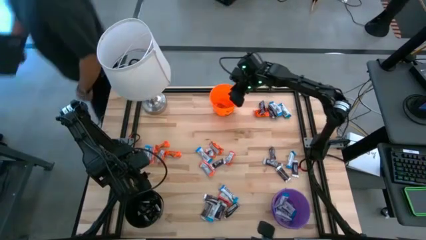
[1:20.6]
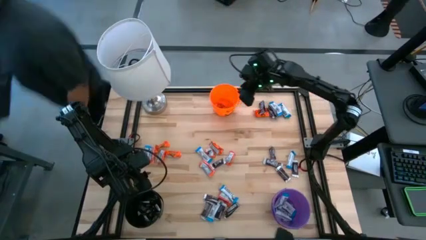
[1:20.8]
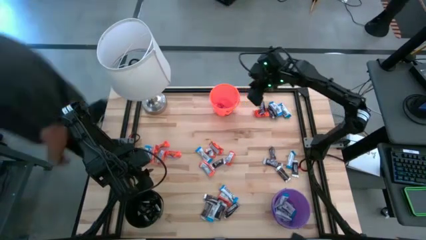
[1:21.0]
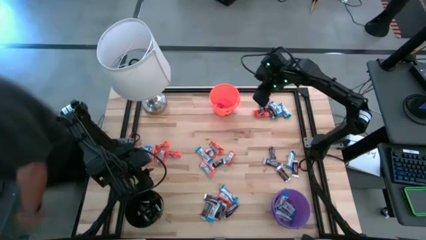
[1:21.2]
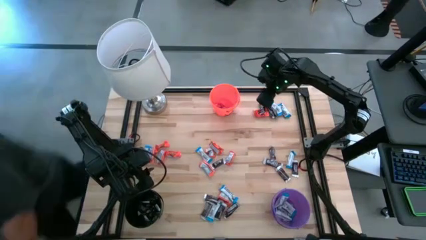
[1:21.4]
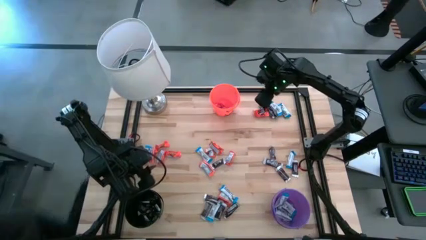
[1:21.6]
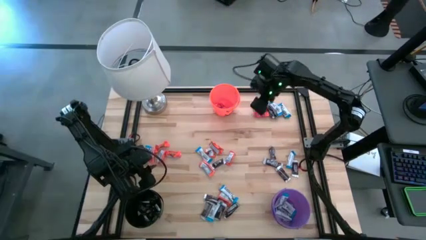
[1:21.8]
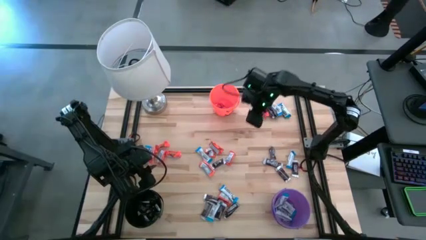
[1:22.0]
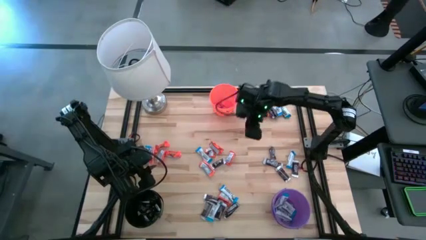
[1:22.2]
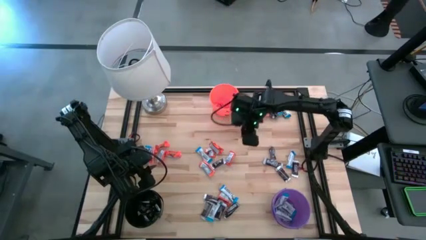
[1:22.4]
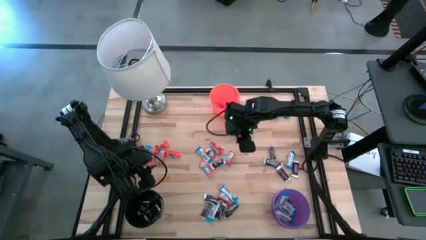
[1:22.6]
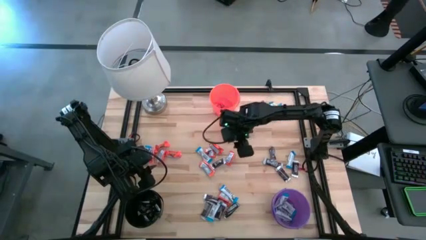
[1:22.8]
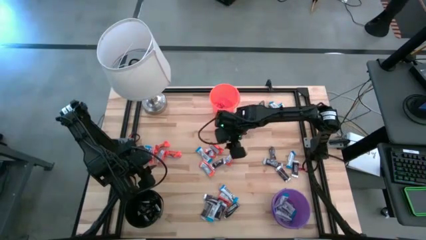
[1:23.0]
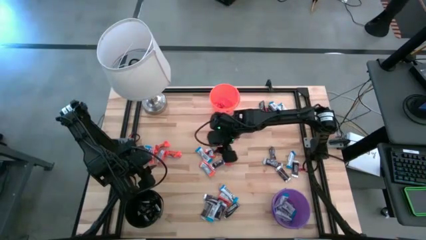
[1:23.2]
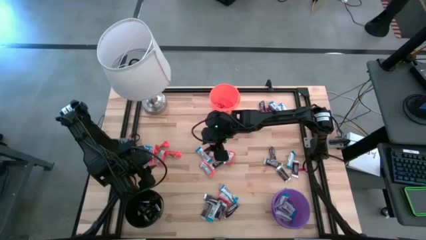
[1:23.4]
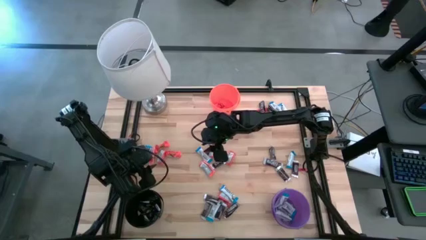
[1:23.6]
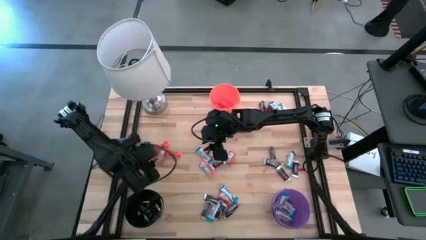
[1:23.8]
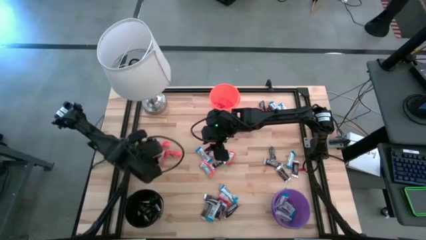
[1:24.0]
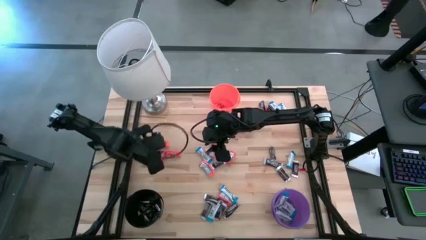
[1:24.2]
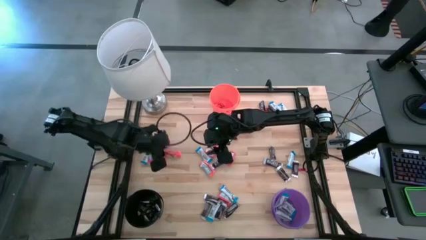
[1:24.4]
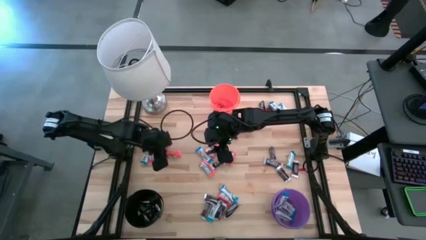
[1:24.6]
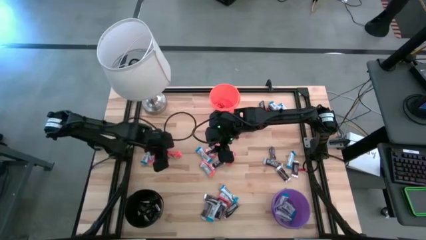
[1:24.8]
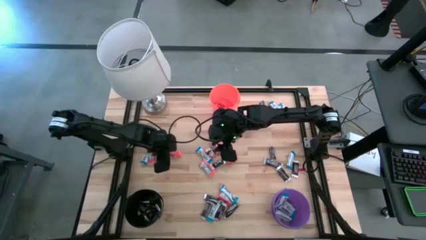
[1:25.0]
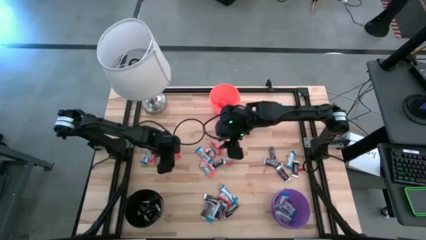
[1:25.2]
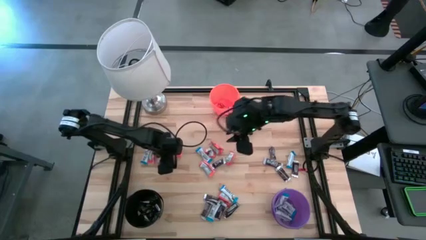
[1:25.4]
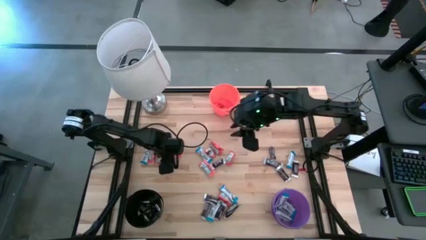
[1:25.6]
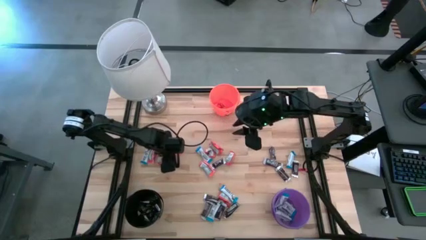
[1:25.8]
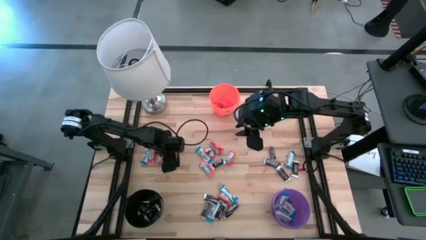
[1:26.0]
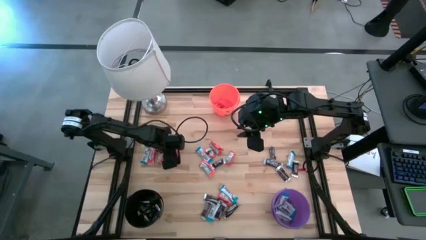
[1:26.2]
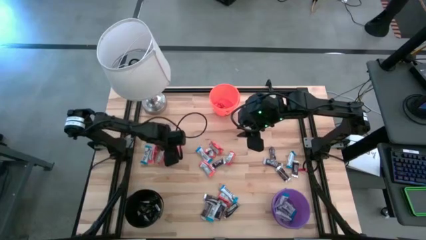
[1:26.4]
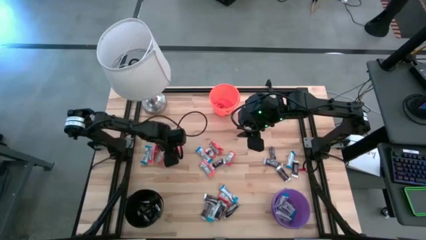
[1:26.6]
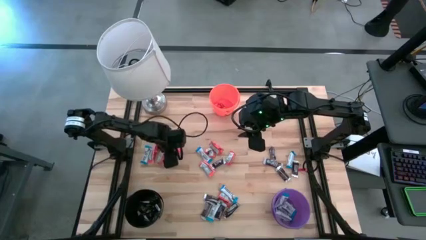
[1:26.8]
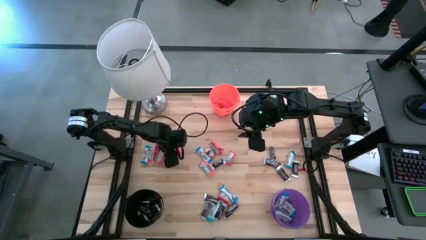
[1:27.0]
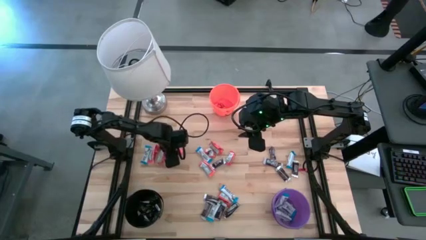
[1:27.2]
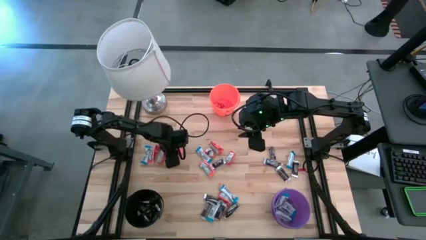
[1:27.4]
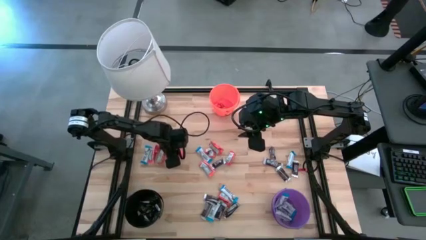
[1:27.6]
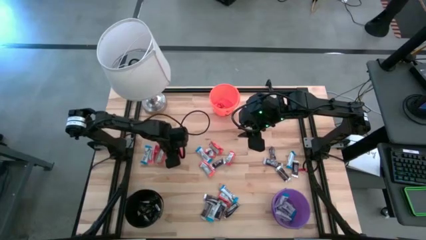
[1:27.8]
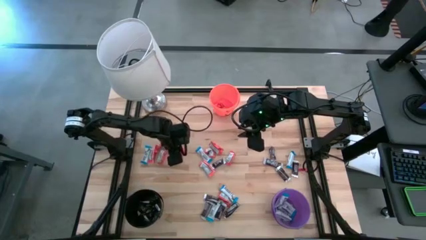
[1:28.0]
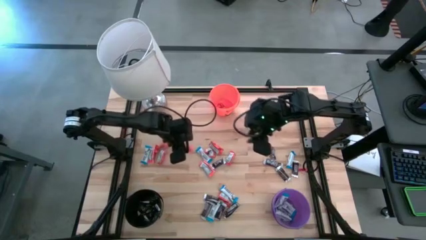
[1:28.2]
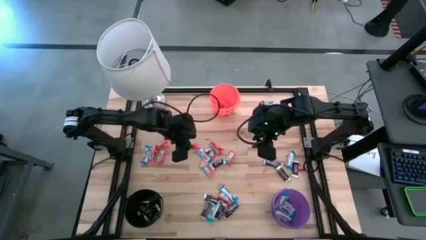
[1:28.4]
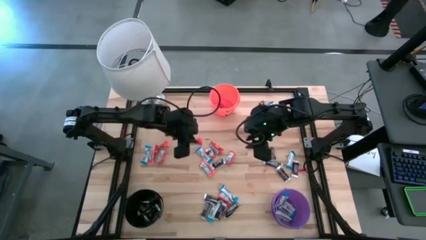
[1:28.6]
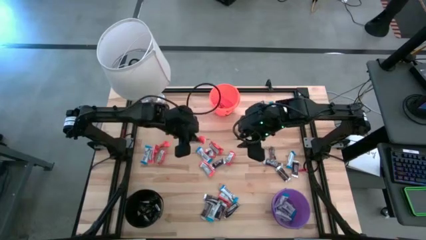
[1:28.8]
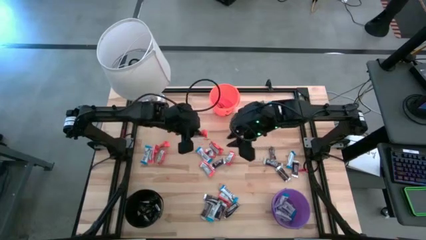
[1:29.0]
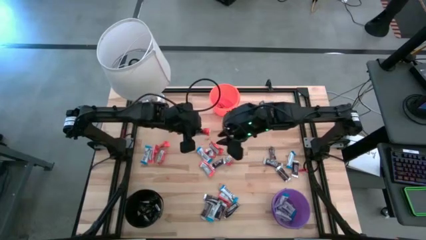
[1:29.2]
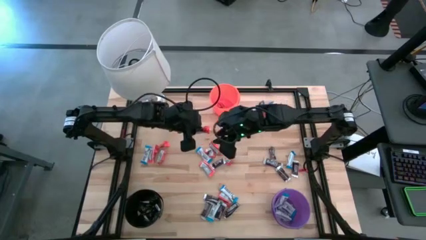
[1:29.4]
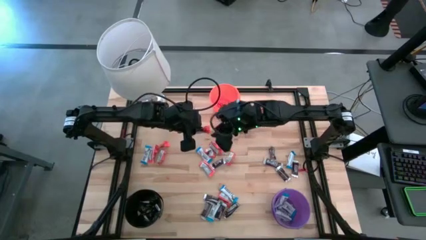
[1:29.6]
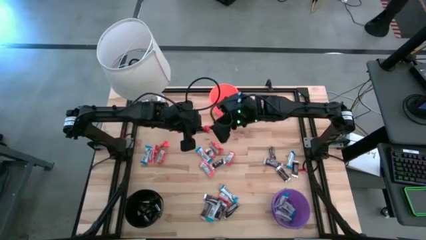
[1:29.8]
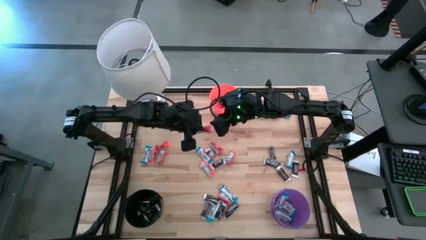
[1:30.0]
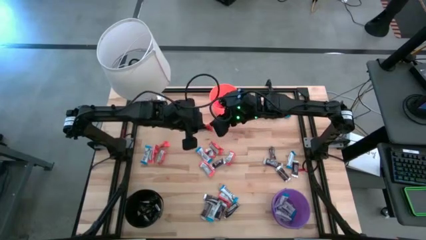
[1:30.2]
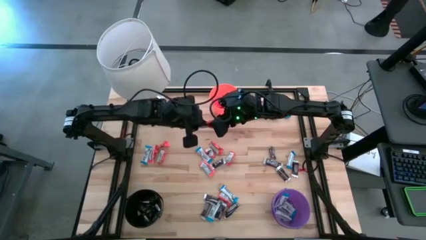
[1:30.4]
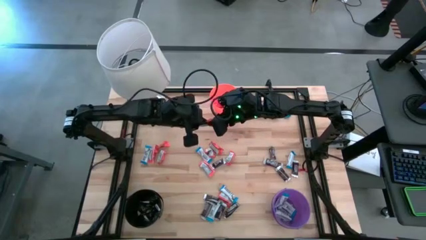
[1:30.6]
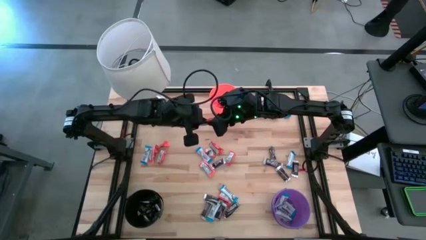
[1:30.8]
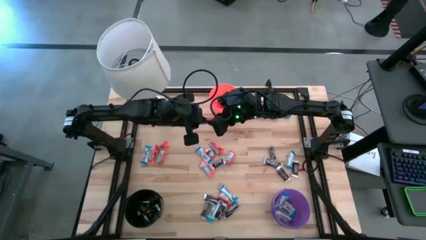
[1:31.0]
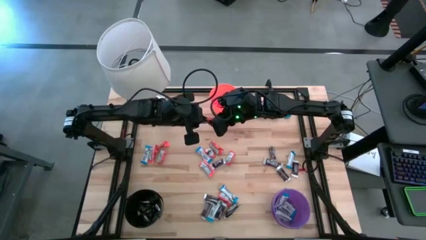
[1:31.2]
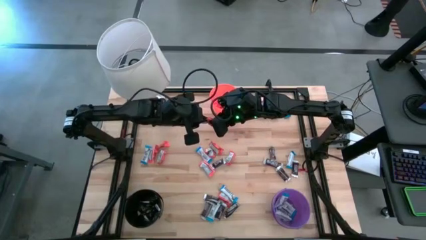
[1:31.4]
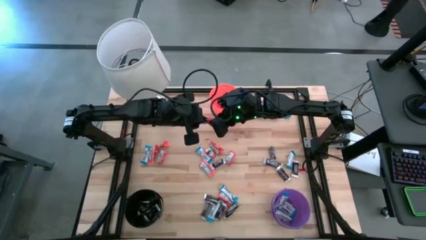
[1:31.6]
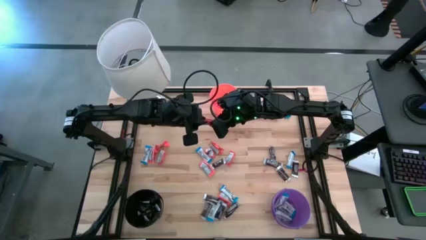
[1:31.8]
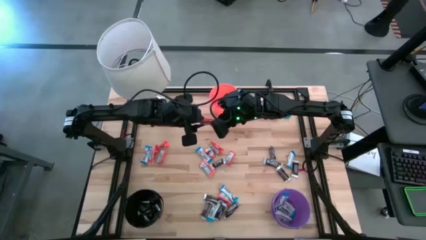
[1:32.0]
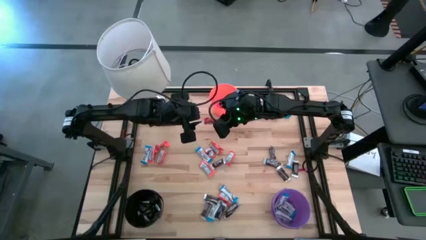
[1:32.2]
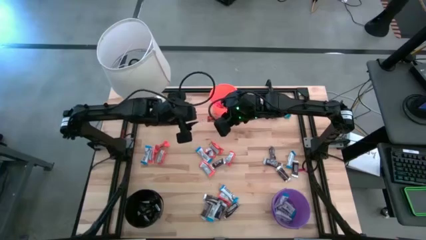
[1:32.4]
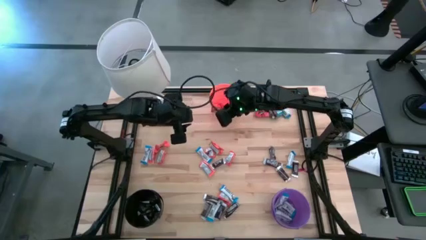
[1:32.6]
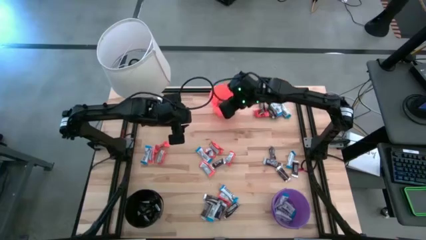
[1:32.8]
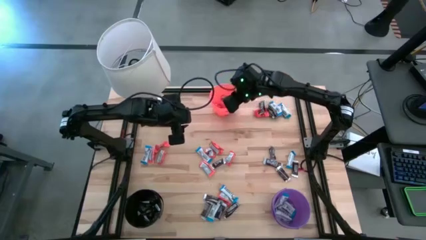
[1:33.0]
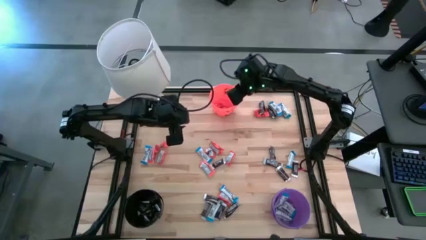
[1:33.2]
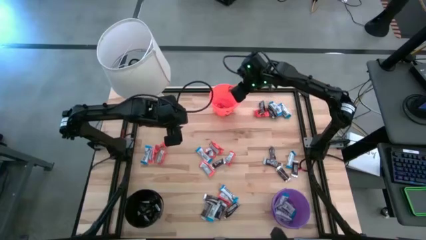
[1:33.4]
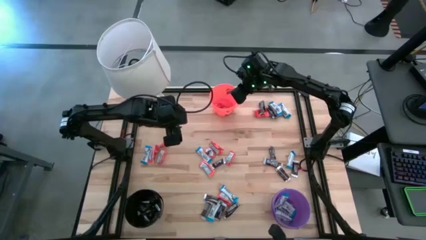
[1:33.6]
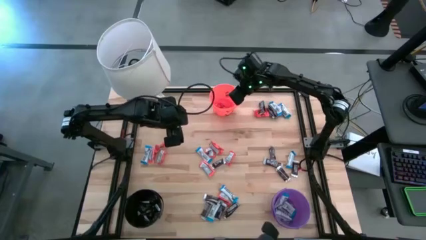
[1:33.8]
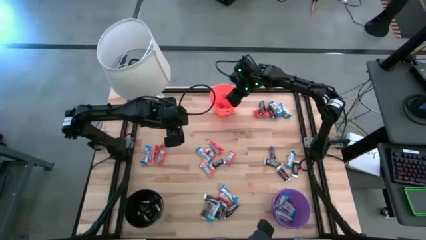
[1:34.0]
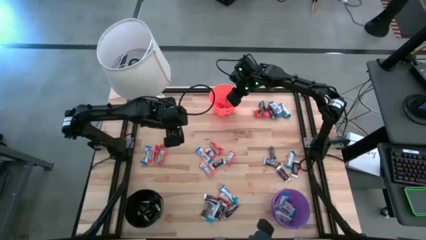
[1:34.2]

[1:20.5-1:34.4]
Task: Organize candy in baskets
Put the orange chocolate into the orange bucket
